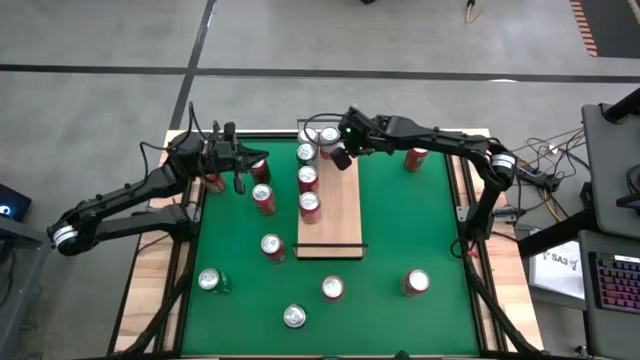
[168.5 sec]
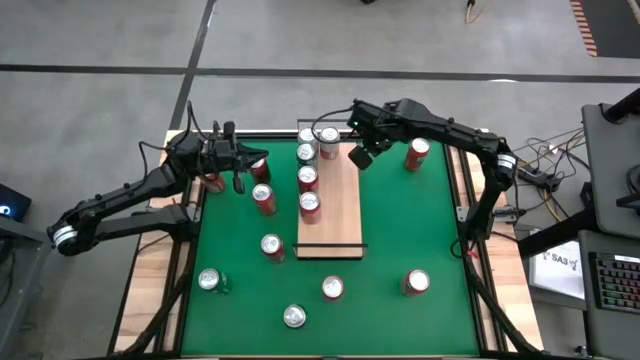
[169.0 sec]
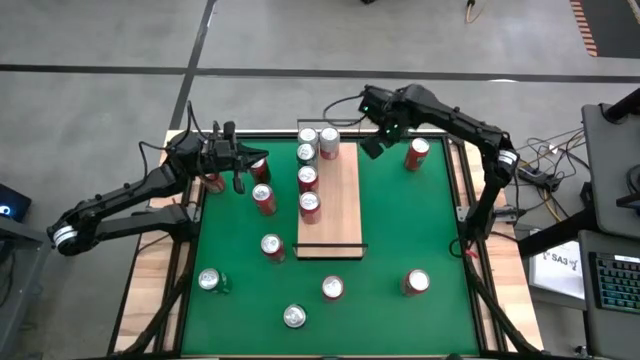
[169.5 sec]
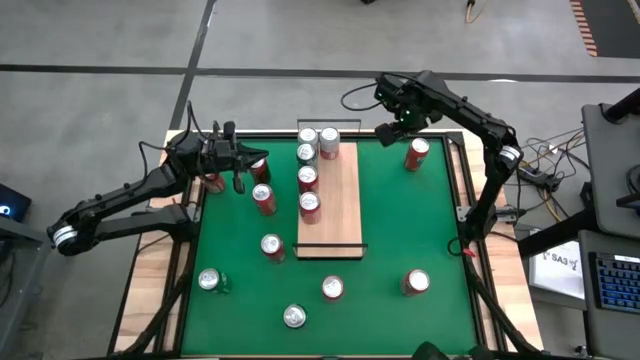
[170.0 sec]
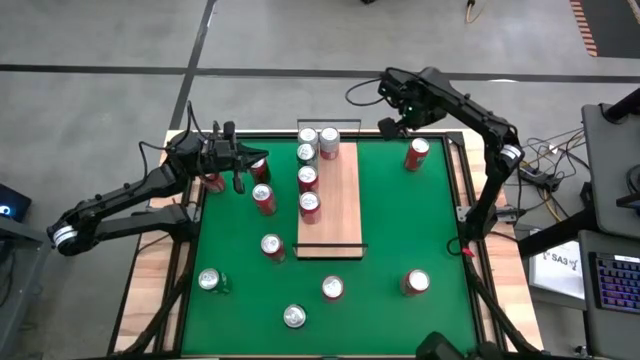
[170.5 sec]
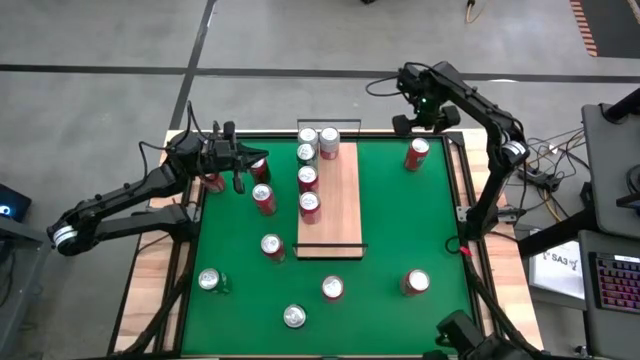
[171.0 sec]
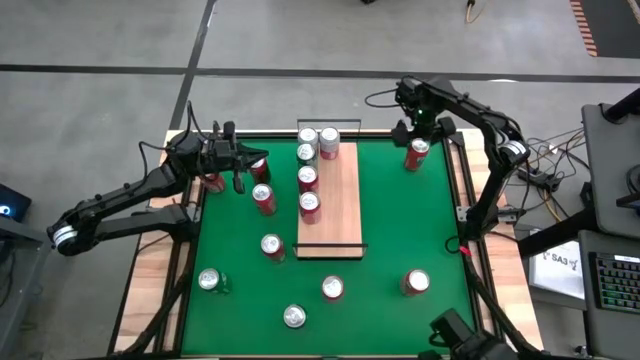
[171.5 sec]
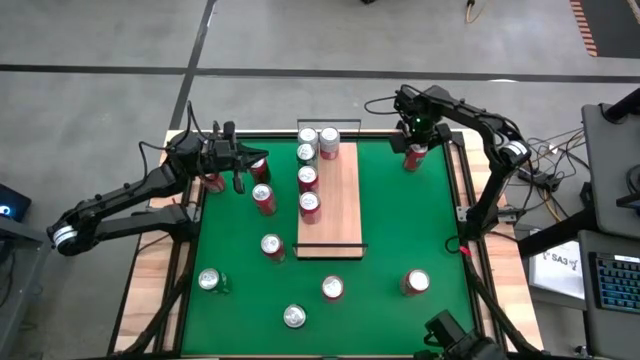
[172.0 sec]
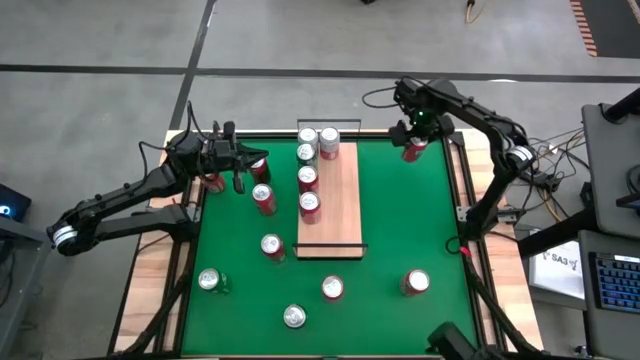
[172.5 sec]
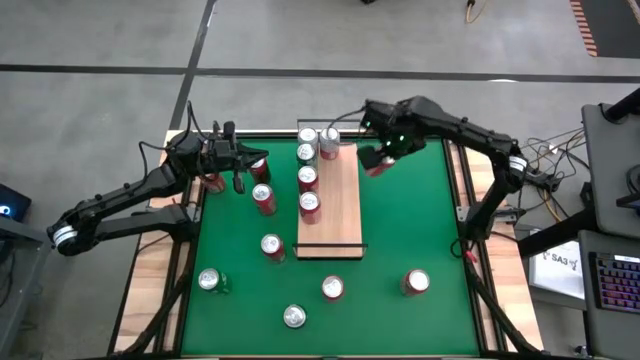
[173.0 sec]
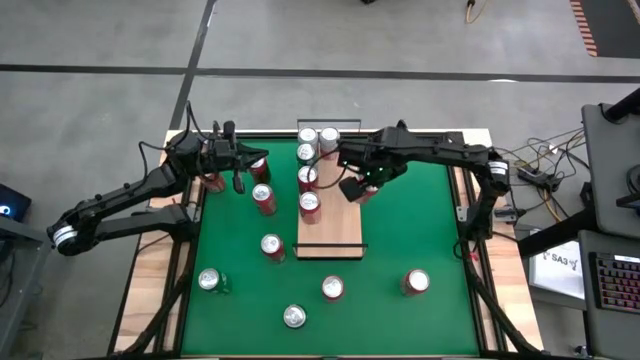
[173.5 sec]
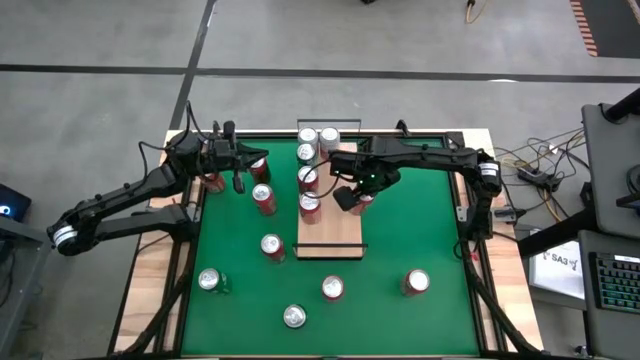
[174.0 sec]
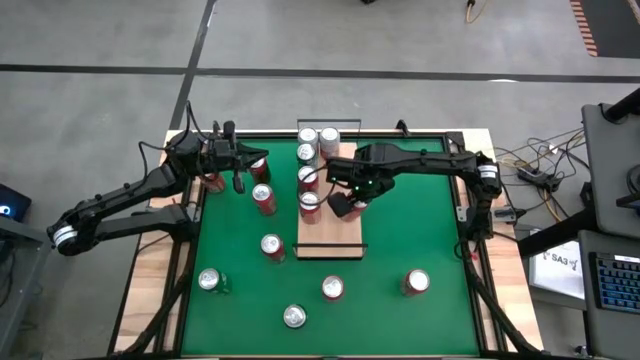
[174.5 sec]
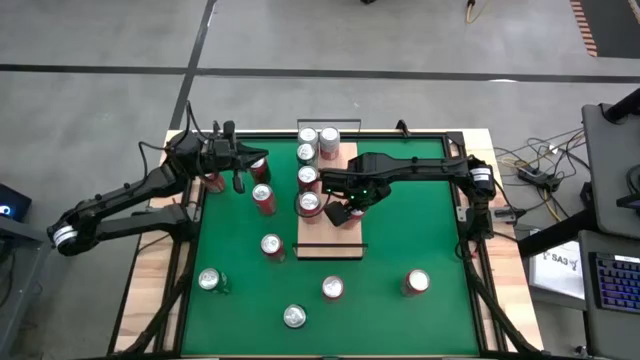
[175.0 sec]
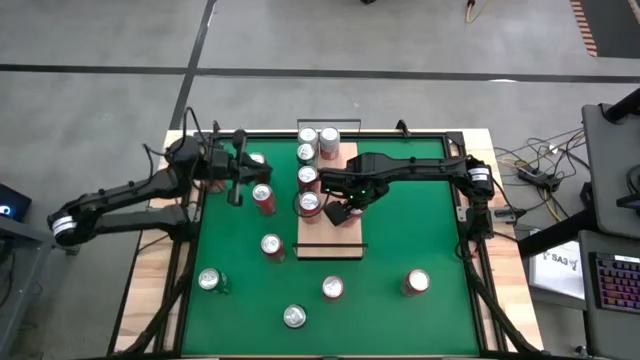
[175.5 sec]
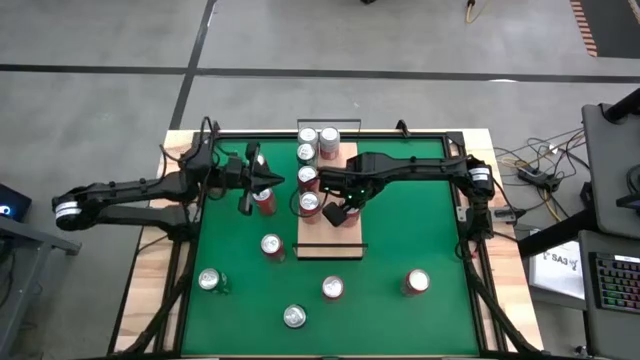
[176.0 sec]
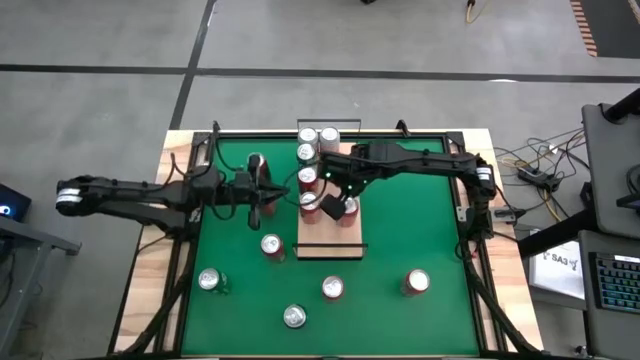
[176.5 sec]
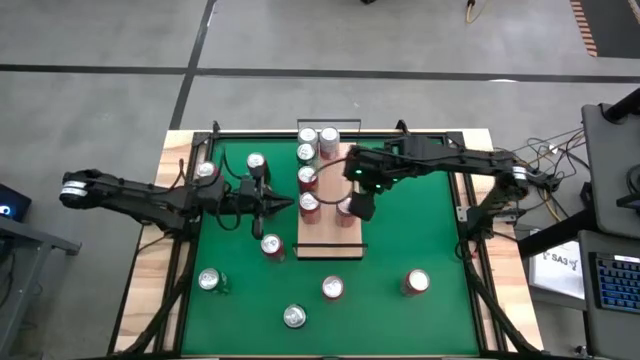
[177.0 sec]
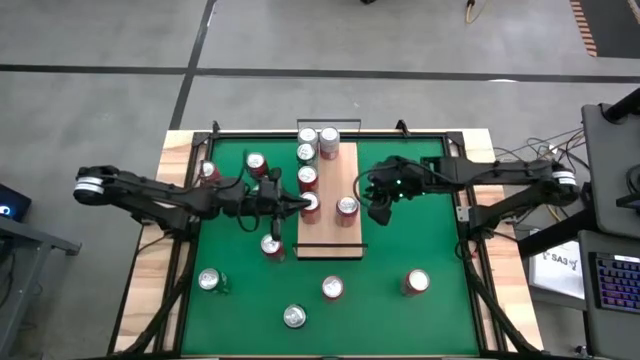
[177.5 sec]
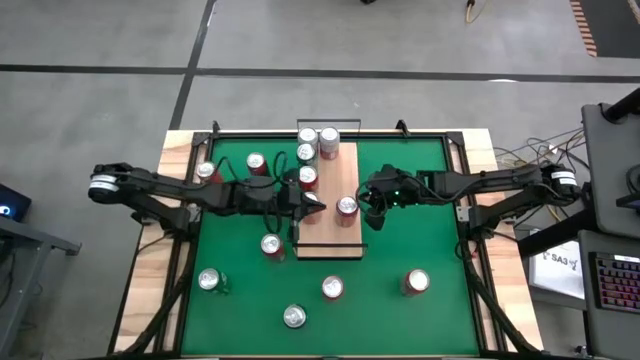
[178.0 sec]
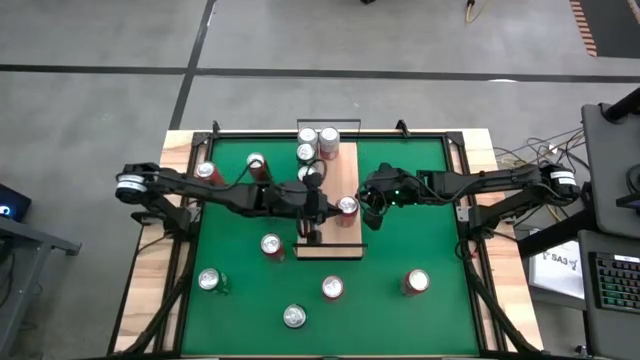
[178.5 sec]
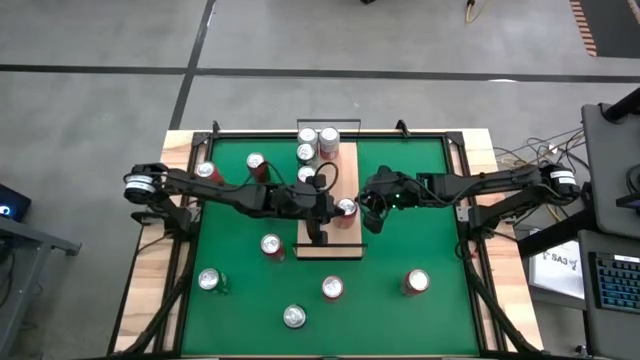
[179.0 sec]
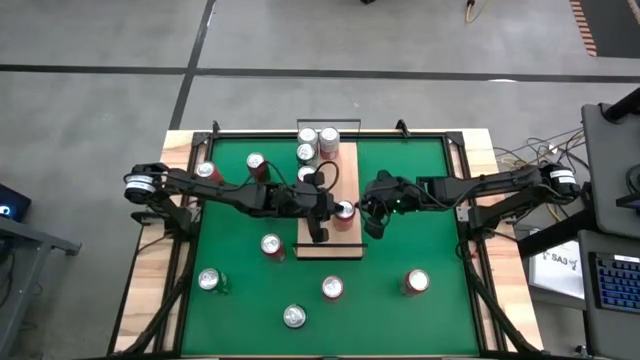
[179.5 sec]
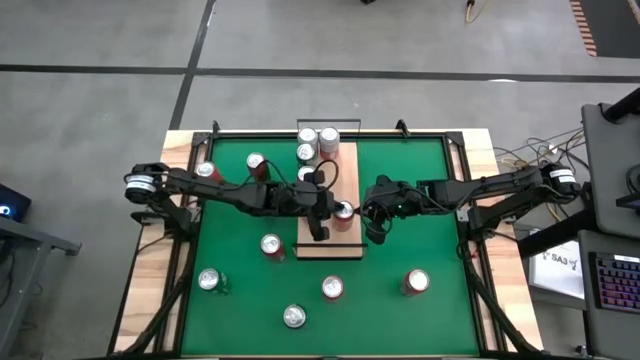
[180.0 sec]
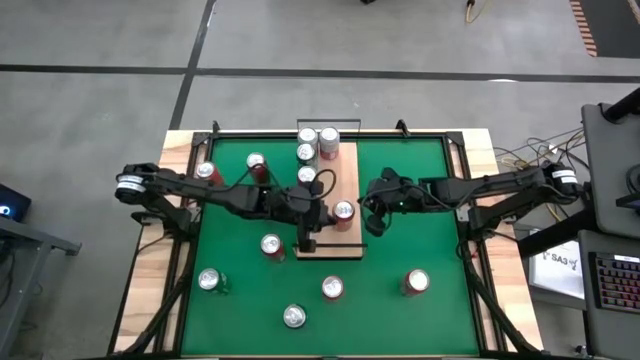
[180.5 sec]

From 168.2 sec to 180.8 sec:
Task: Place canned beverage on shelf
Put the orange soda can on the shelf and aligned with the other orange soda can

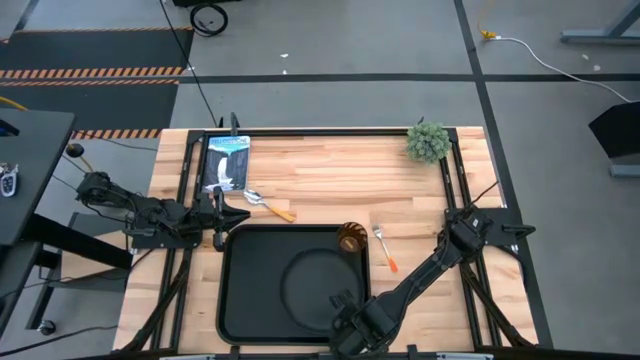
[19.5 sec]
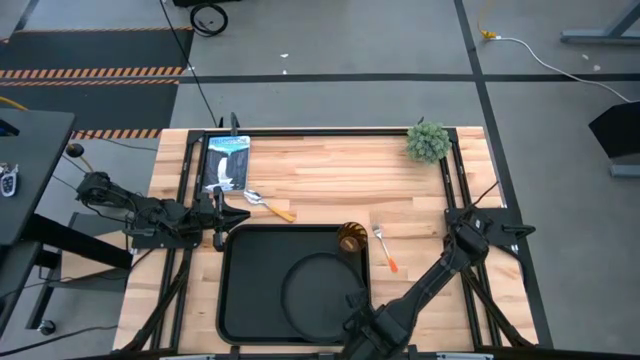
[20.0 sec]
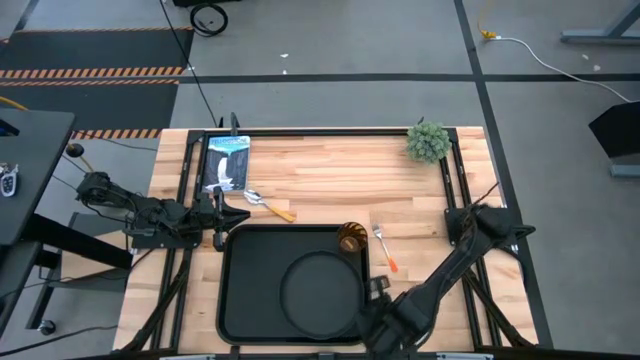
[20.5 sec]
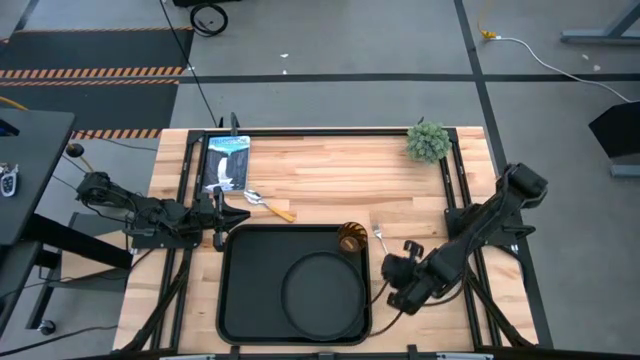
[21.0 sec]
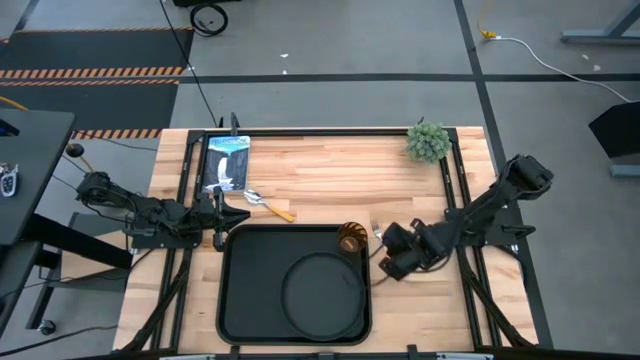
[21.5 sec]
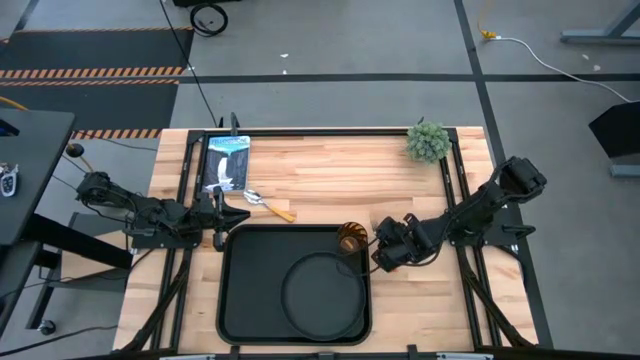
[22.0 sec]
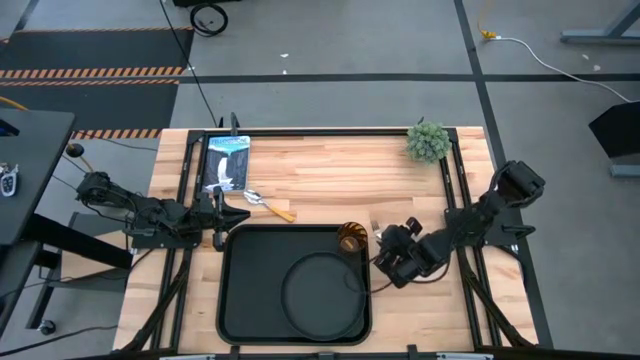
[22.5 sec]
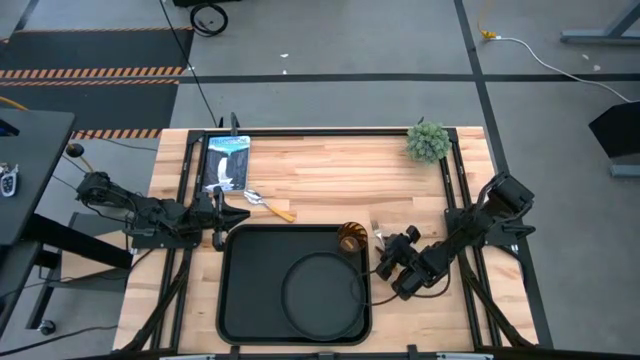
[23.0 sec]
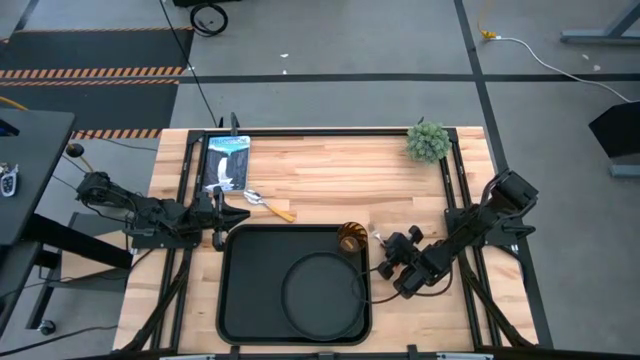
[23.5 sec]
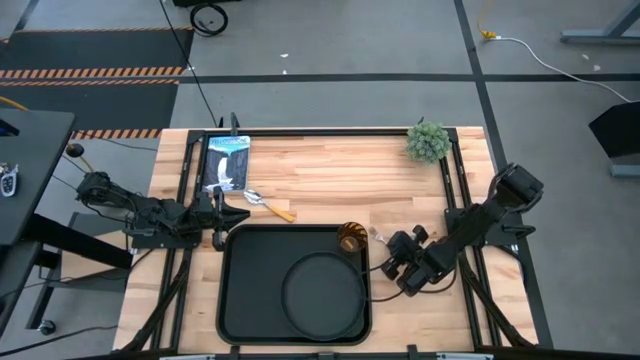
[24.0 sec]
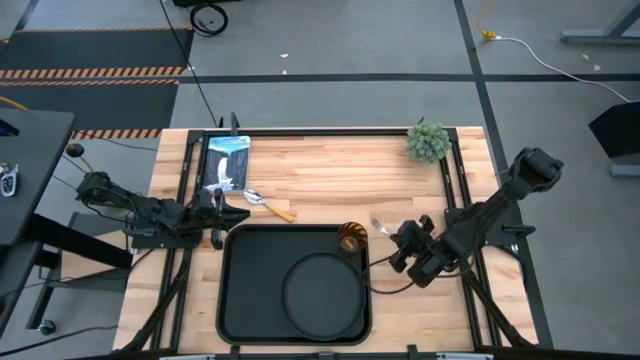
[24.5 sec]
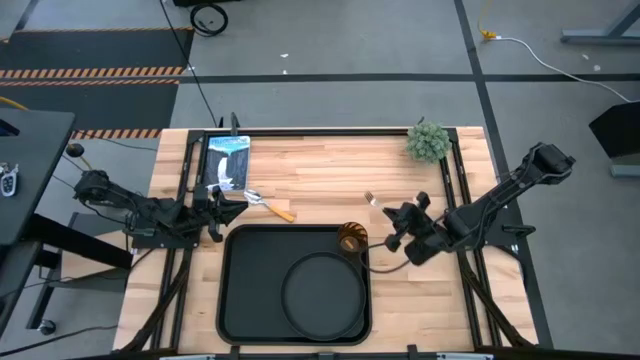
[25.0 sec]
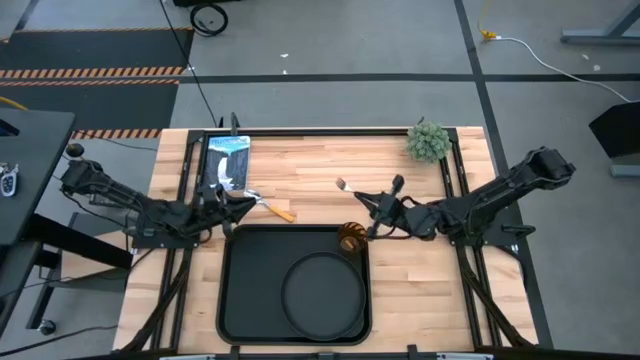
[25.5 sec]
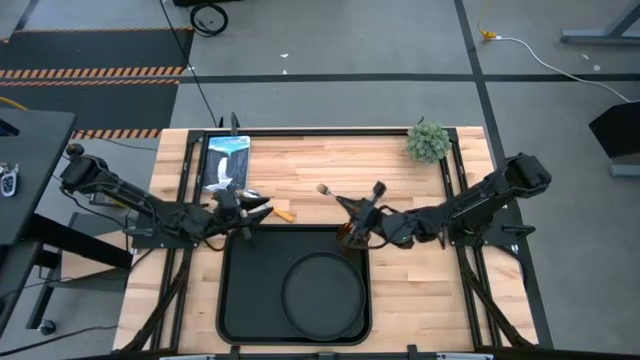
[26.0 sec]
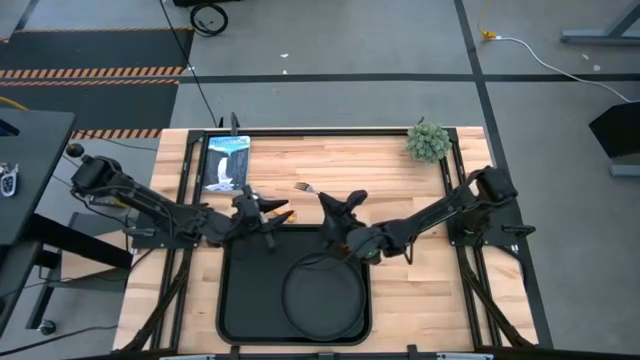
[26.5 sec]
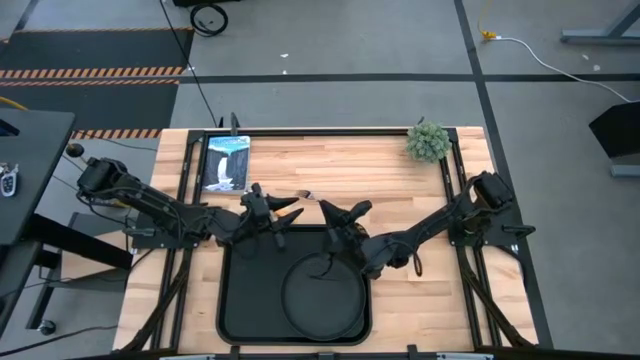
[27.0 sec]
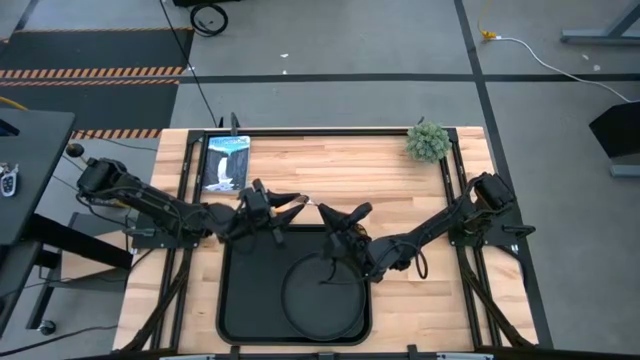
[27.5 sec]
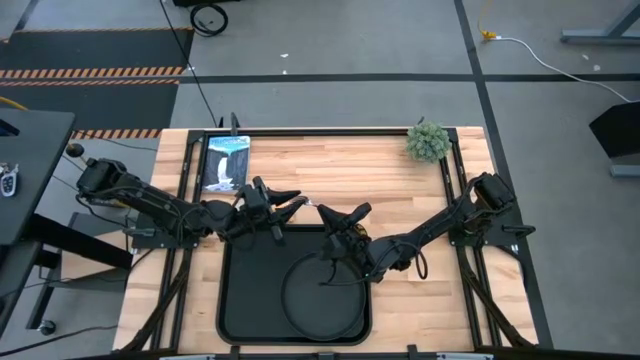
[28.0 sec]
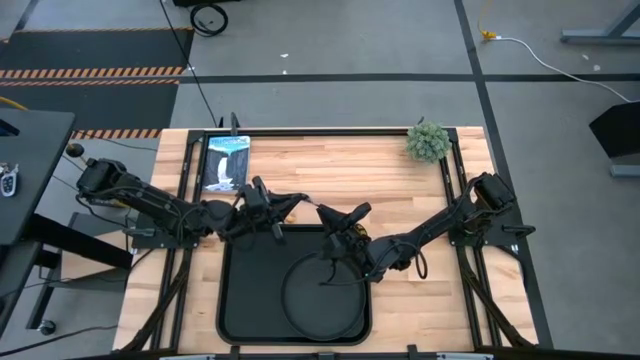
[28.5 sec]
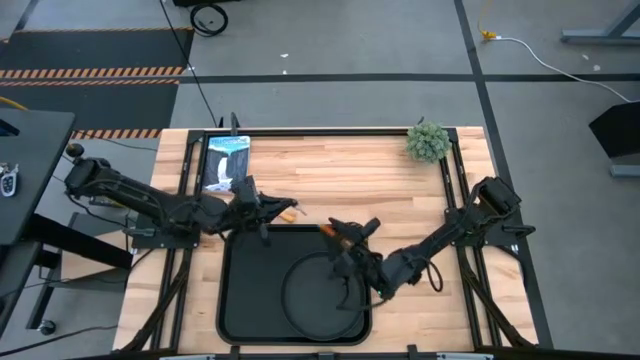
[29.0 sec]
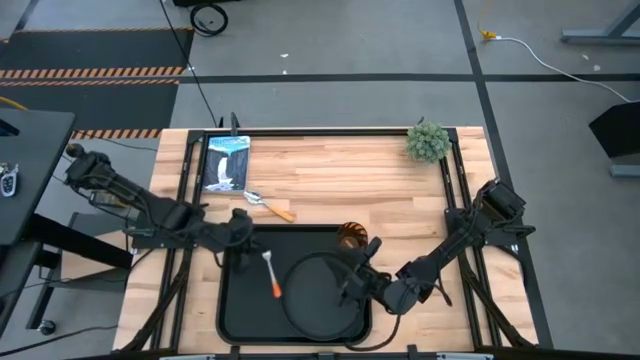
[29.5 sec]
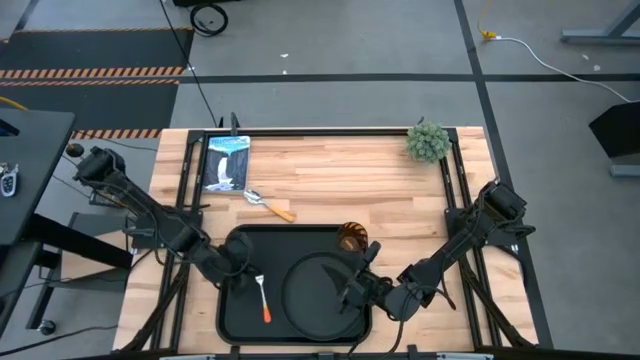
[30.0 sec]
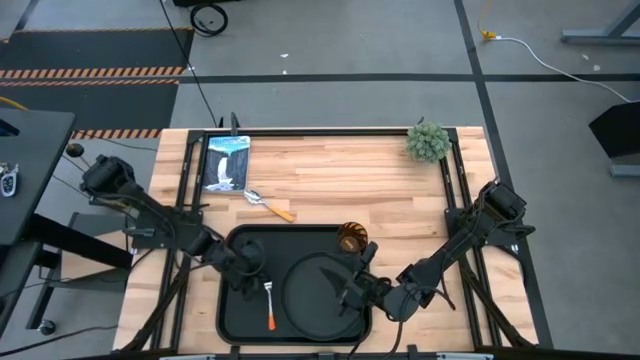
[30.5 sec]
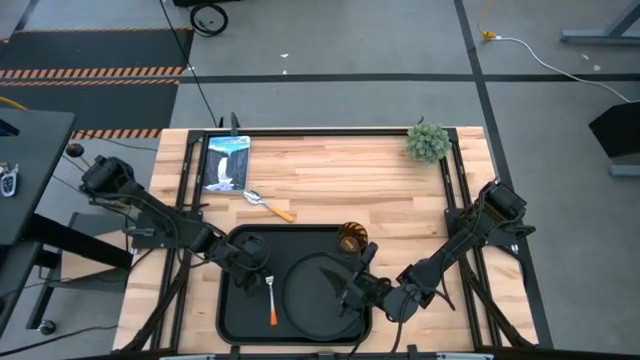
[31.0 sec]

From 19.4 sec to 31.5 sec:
Task: Pick and place plate/cup/fork/spoon on tray
Put the orange fork beside the black plate on the tray
